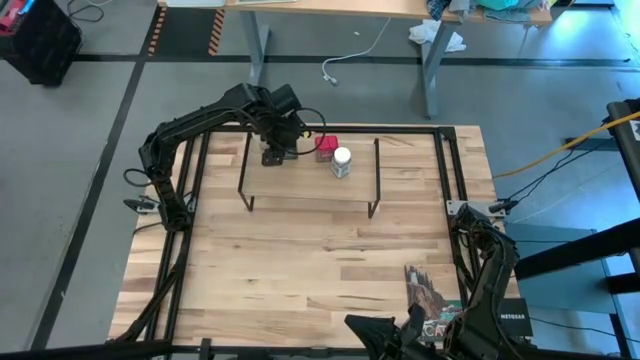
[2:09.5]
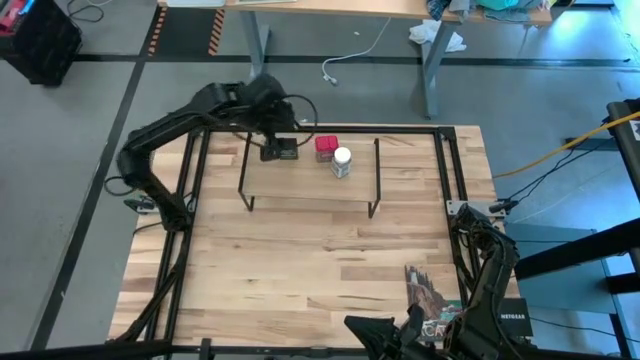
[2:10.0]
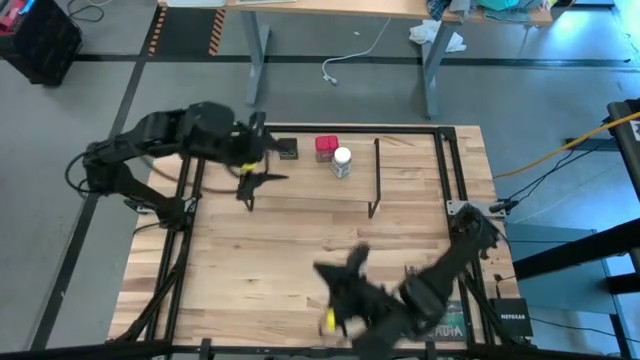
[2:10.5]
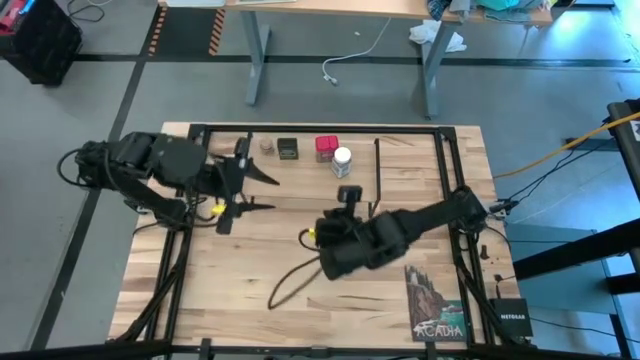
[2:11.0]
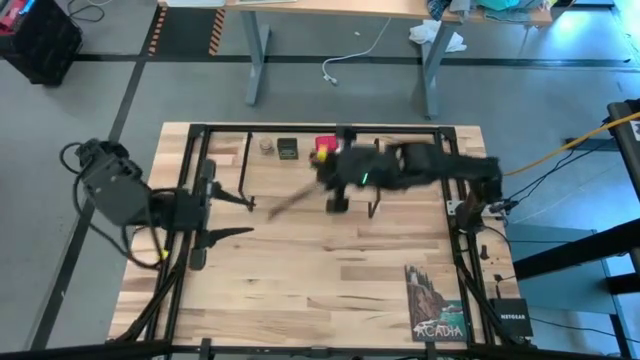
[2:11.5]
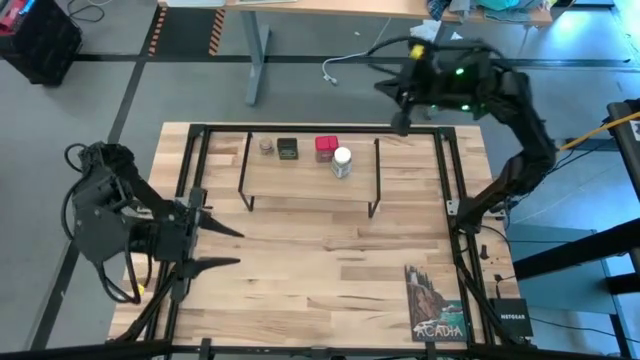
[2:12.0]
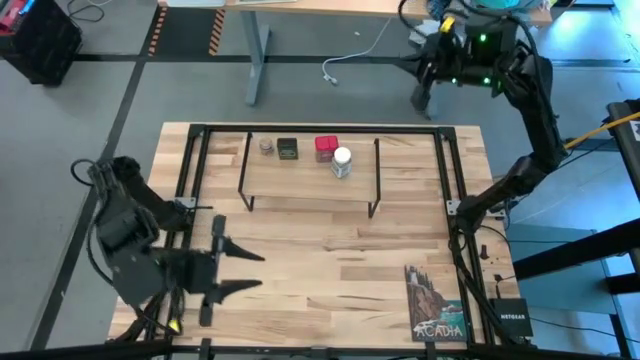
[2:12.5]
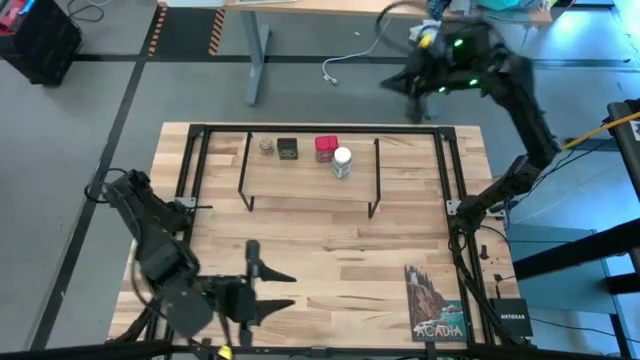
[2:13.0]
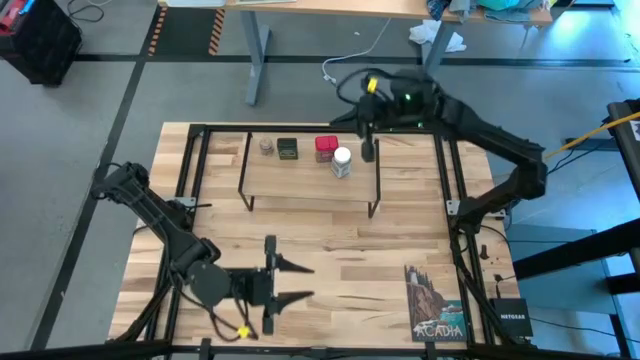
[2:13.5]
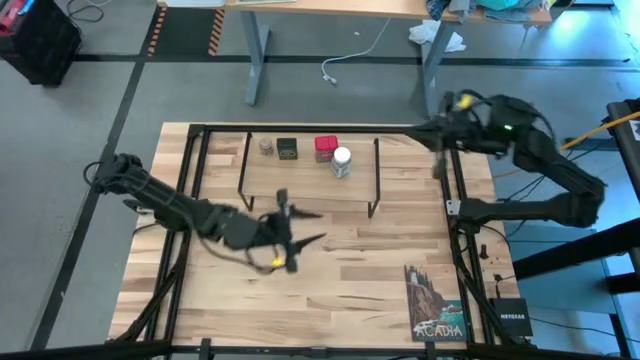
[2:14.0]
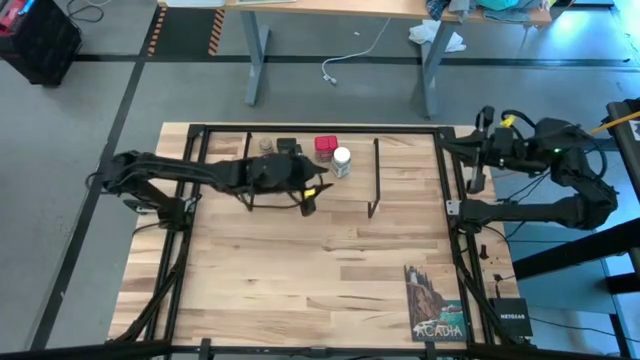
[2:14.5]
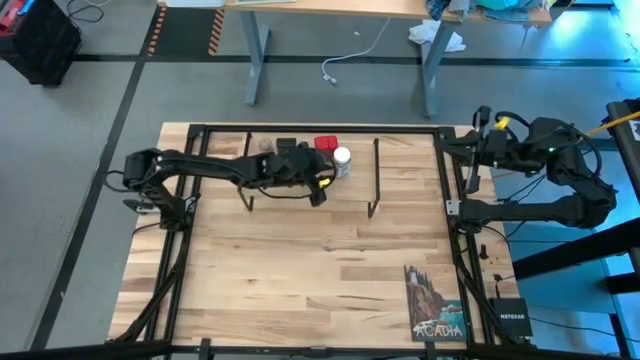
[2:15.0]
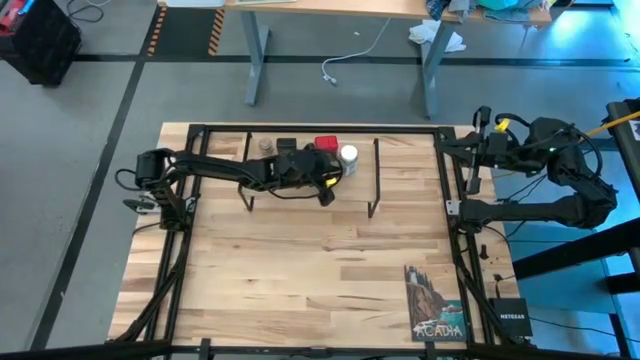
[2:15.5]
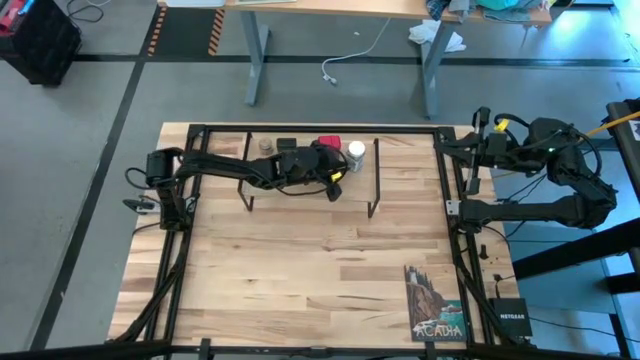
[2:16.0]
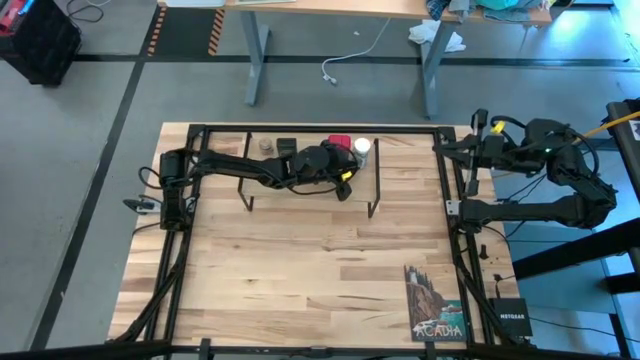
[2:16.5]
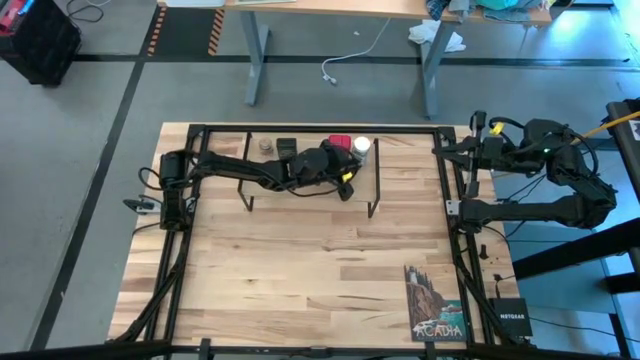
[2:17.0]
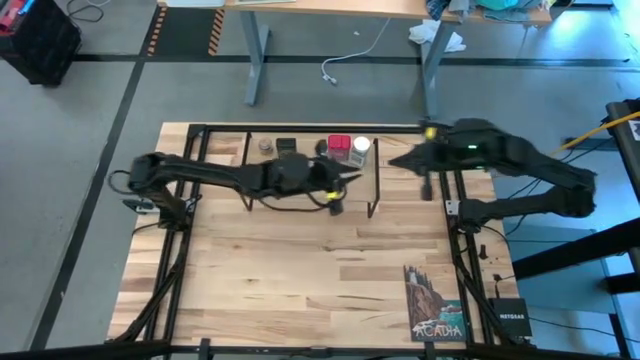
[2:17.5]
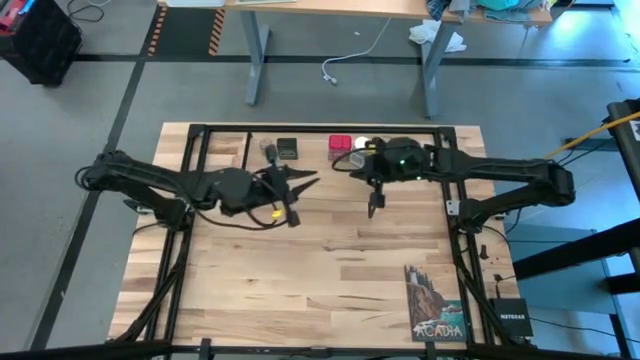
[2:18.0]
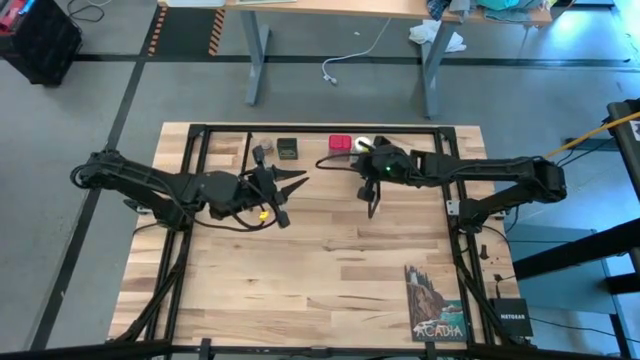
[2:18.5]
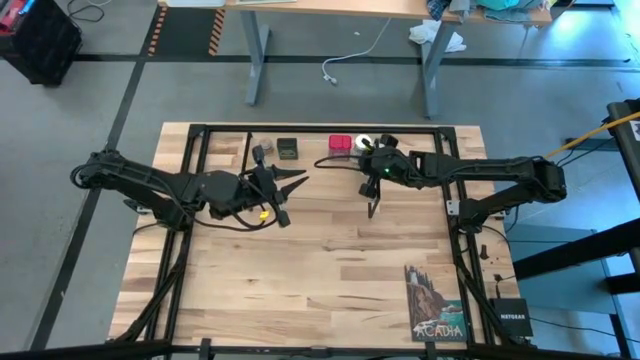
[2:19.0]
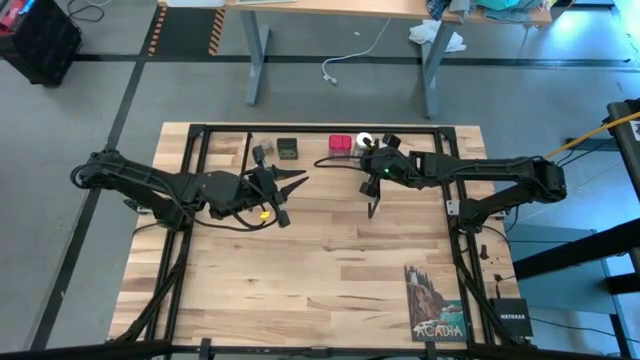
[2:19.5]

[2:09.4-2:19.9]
Task: Shelf spices
Adjust the white seasoning bottle

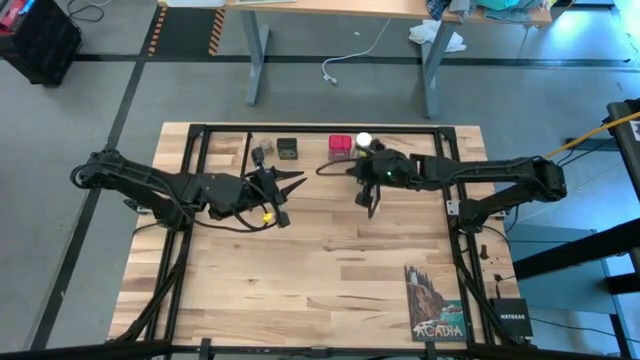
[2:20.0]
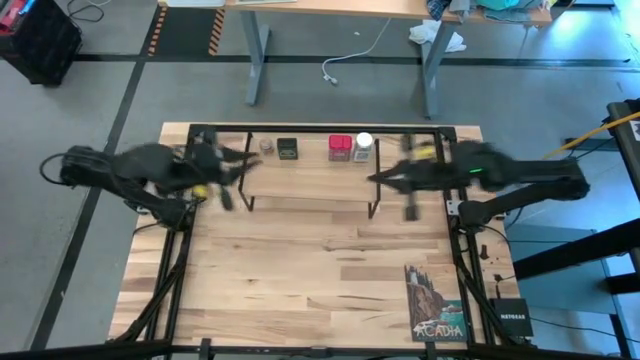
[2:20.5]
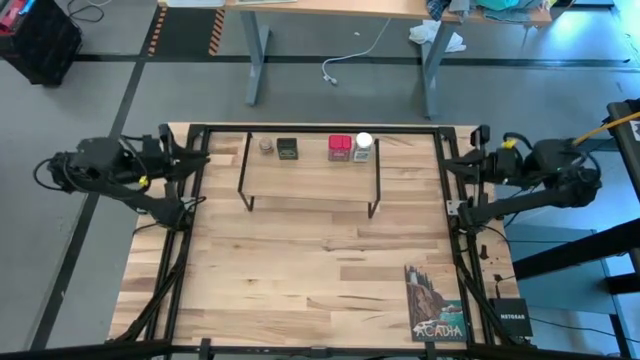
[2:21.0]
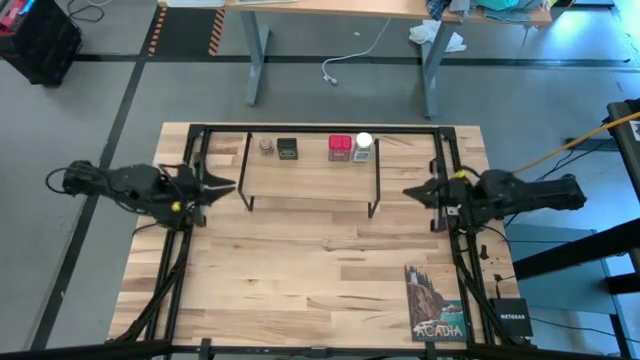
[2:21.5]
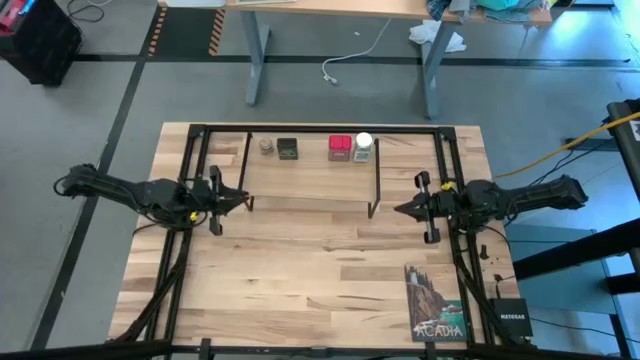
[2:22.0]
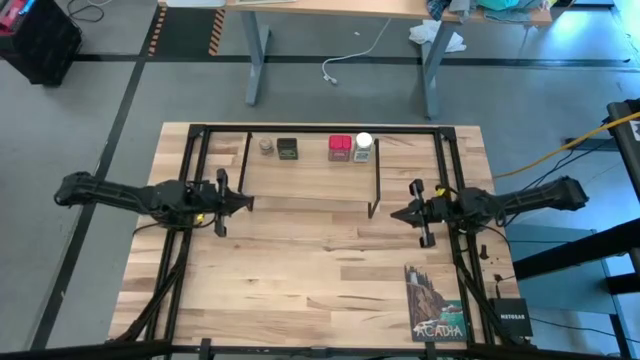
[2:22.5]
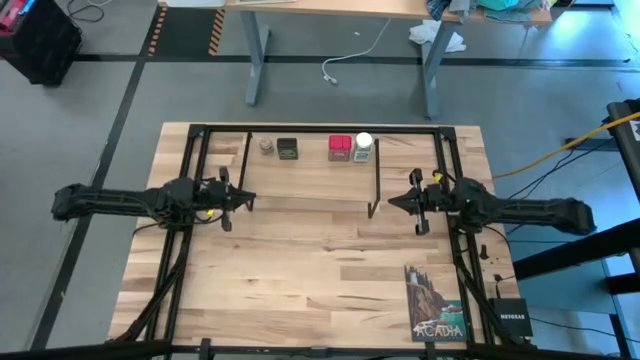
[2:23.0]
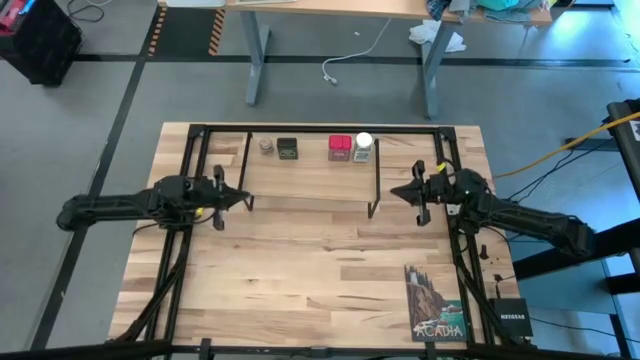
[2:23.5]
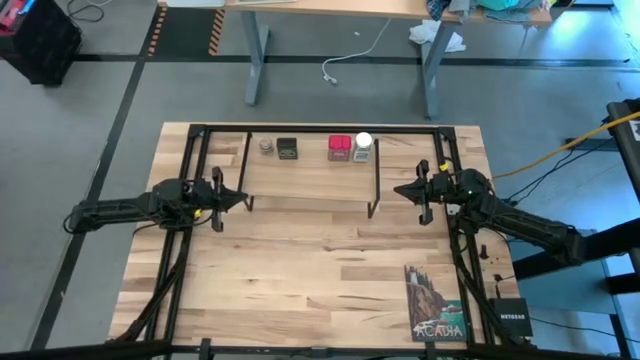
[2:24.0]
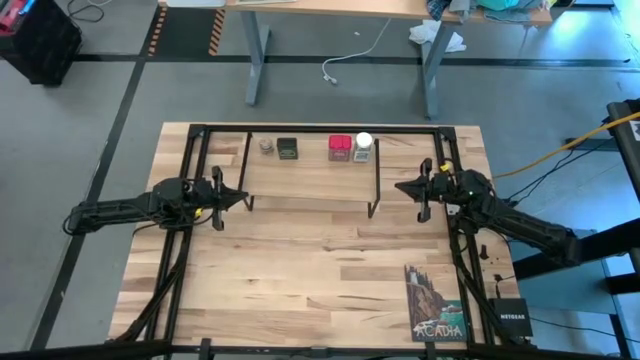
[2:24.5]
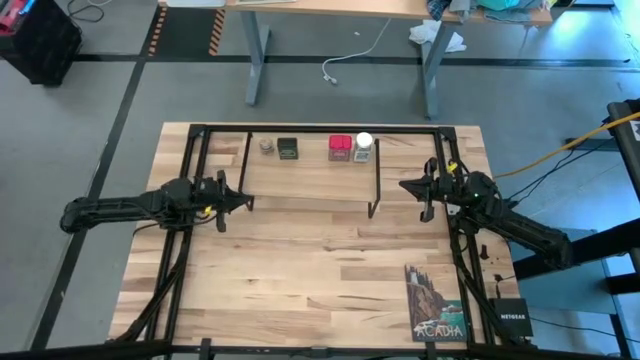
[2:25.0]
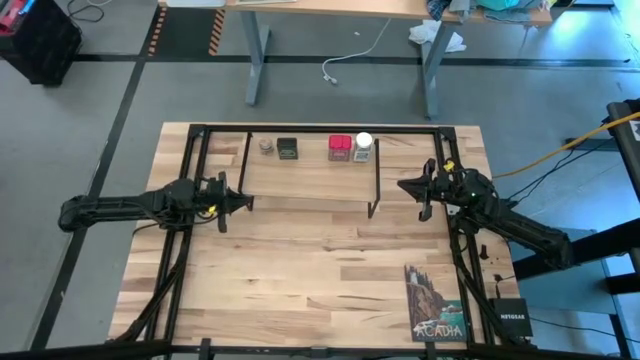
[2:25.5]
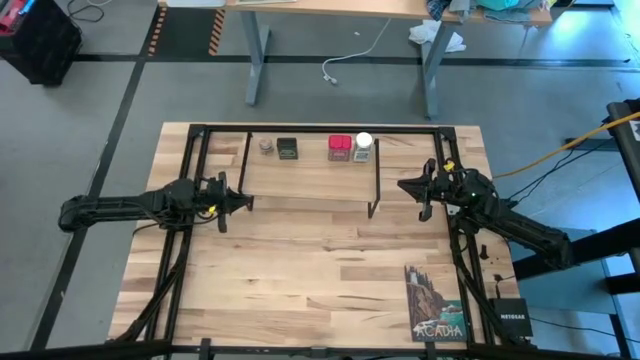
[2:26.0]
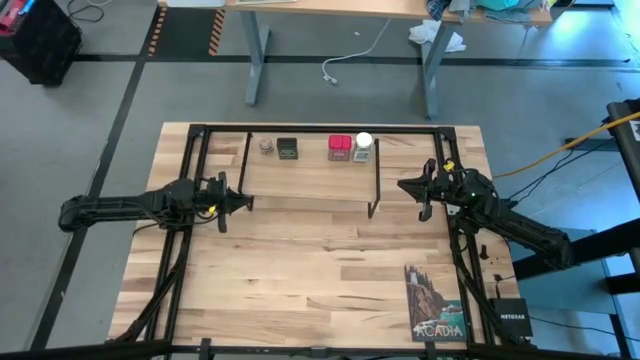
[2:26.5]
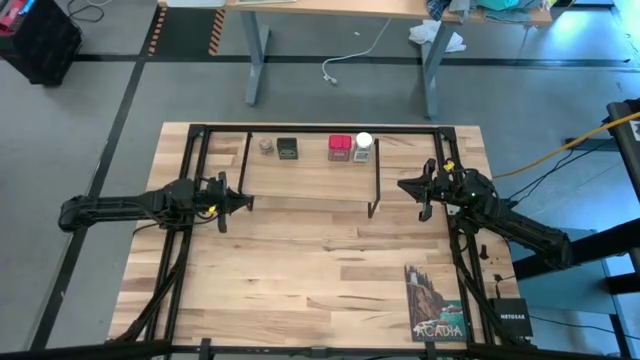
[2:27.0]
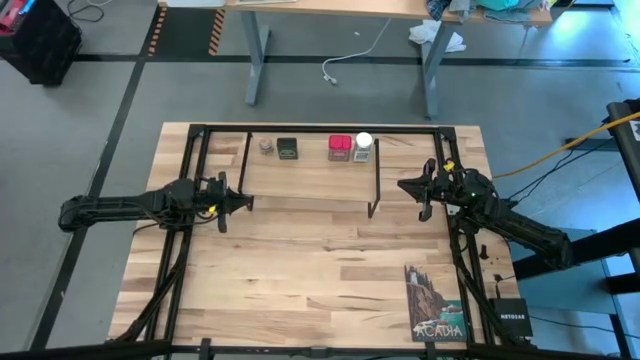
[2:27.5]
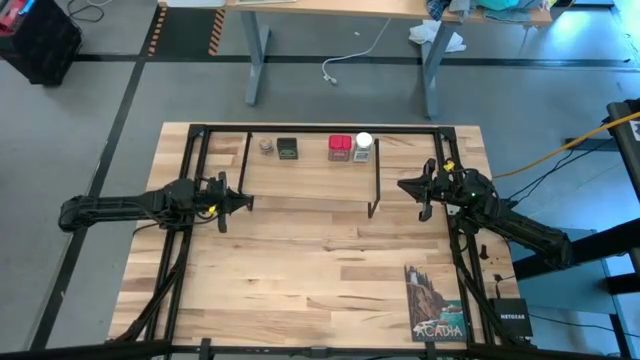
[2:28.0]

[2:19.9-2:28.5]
Return to Home Position

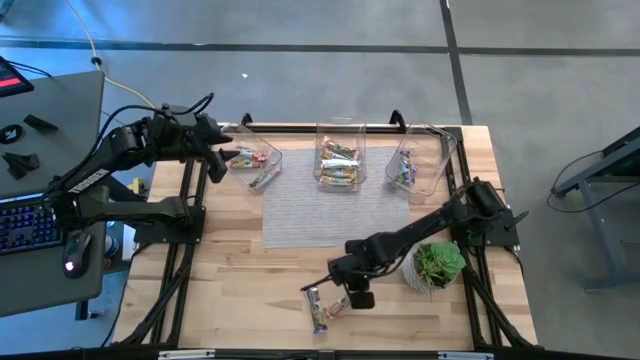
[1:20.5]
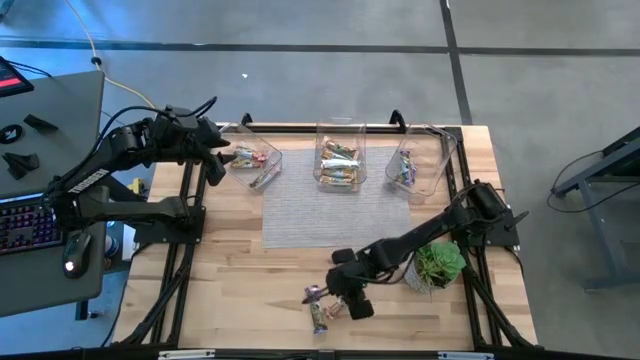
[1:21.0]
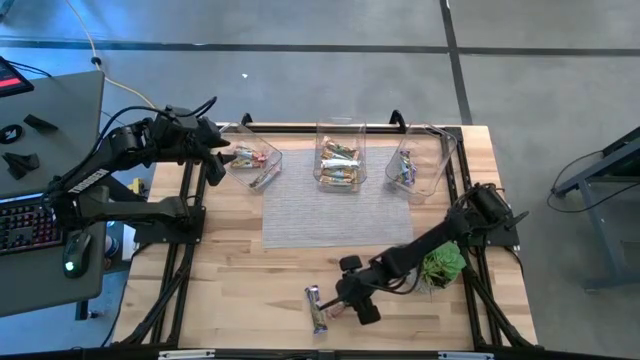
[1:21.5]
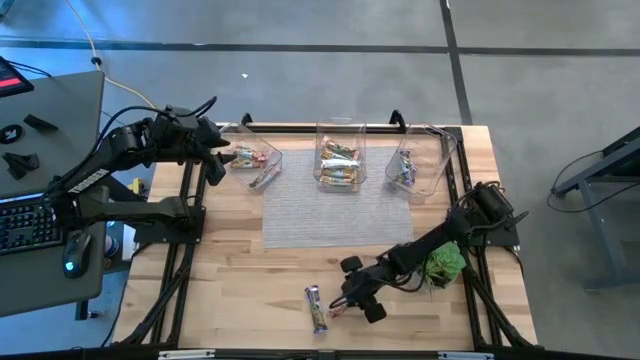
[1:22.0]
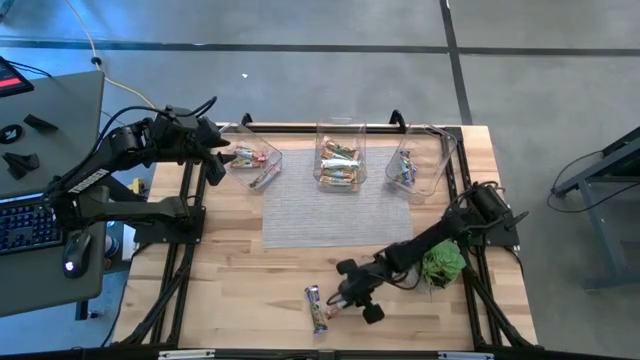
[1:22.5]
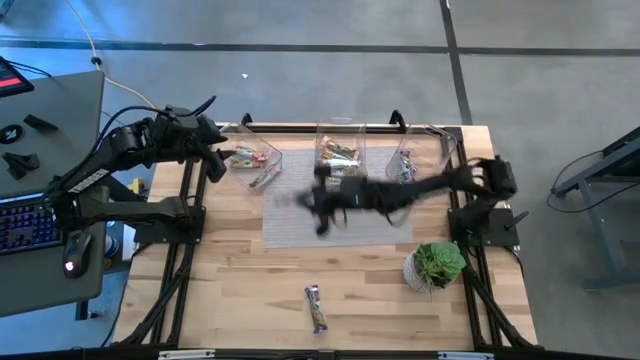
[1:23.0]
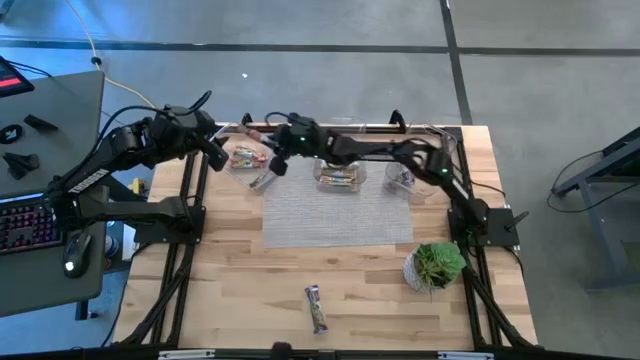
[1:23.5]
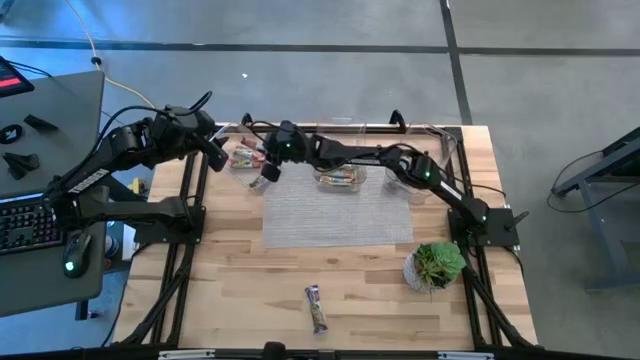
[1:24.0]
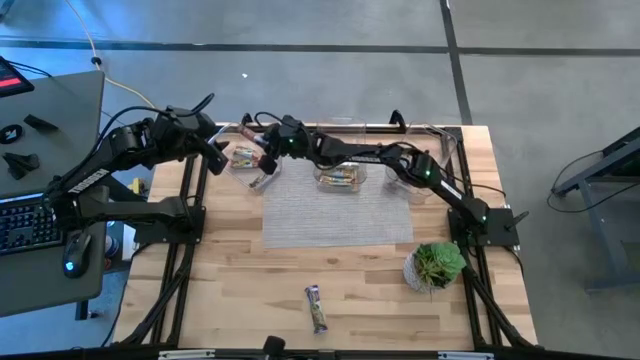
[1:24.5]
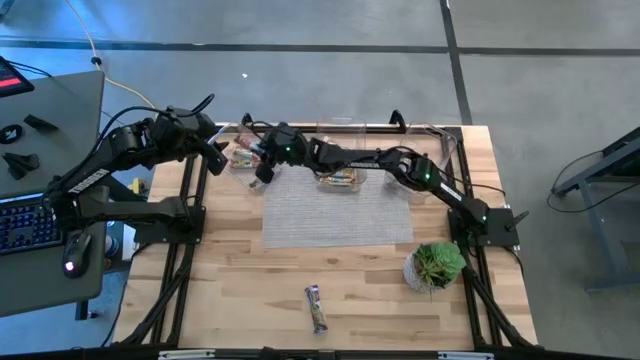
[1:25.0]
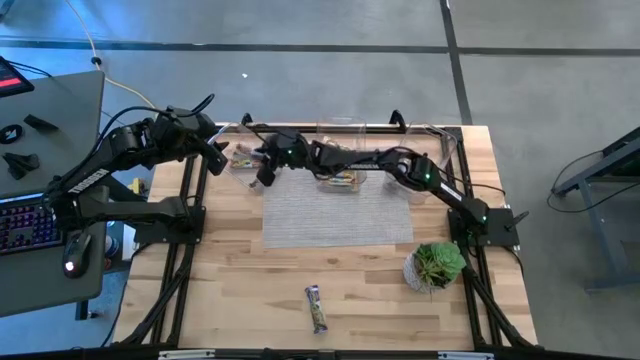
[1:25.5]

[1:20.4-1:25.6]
Task: Pick and place Granola Bars by type
Put the red granola bar into the left transparent bin
